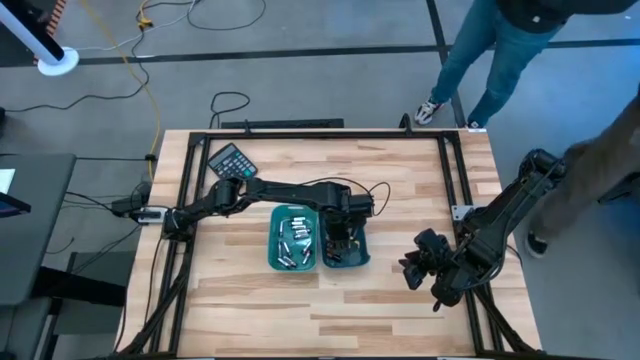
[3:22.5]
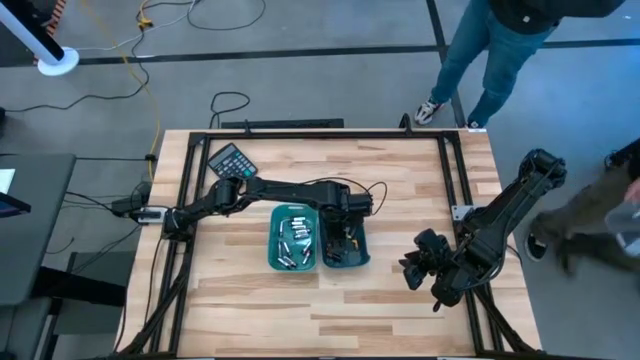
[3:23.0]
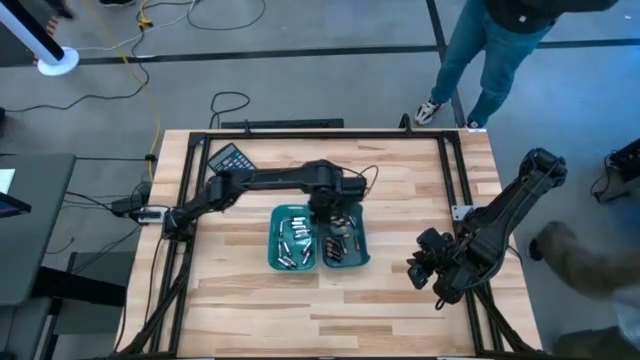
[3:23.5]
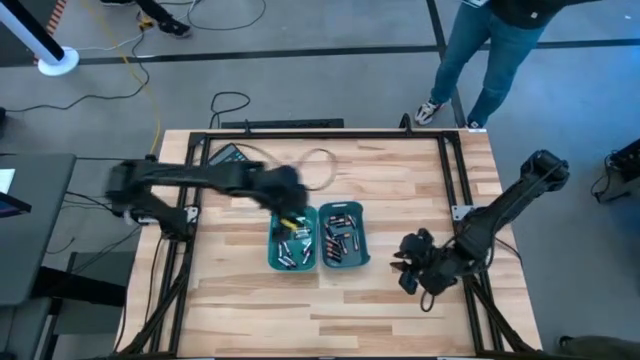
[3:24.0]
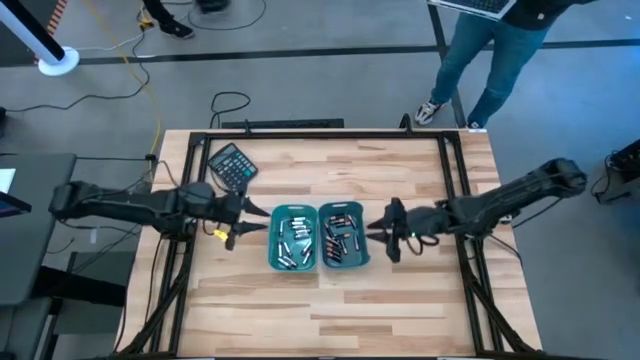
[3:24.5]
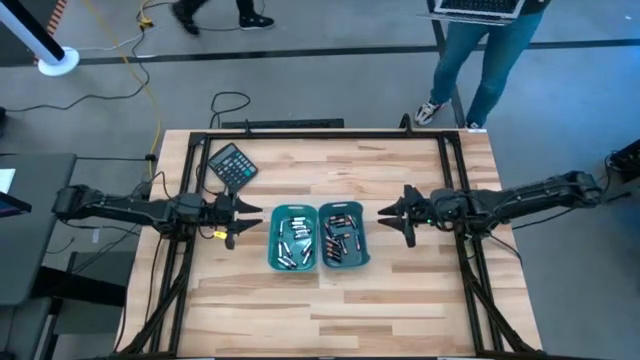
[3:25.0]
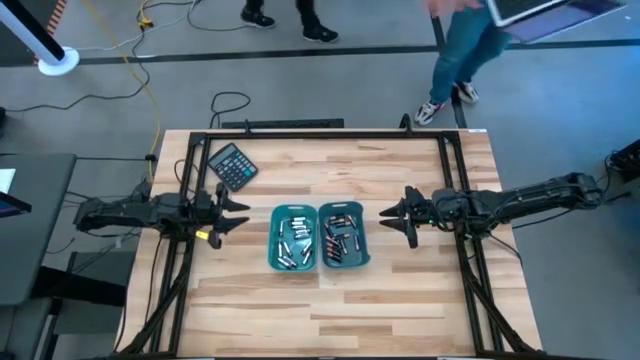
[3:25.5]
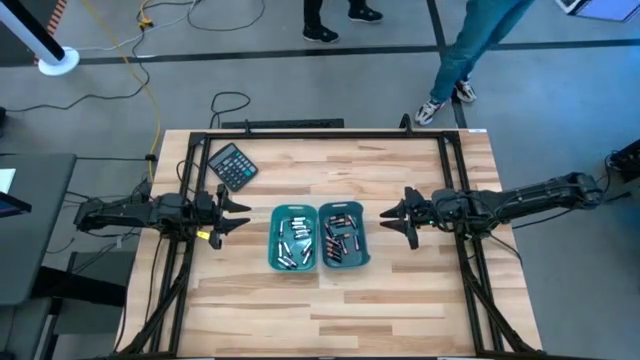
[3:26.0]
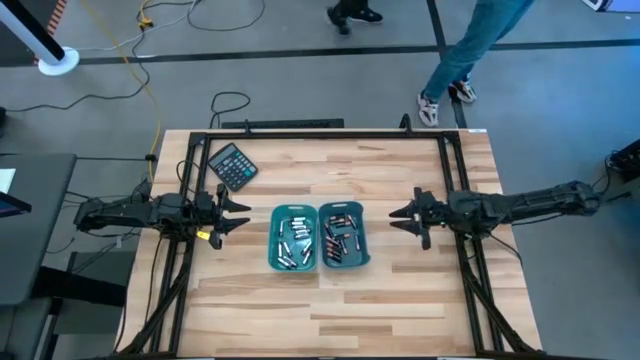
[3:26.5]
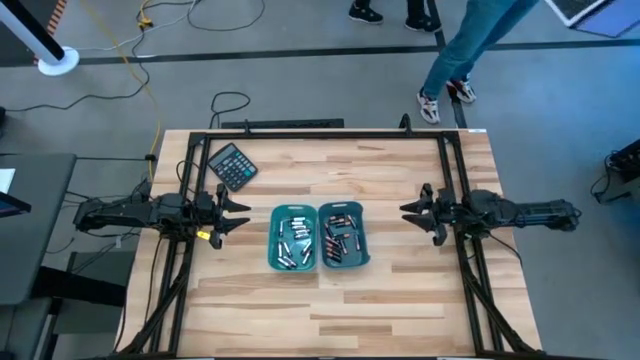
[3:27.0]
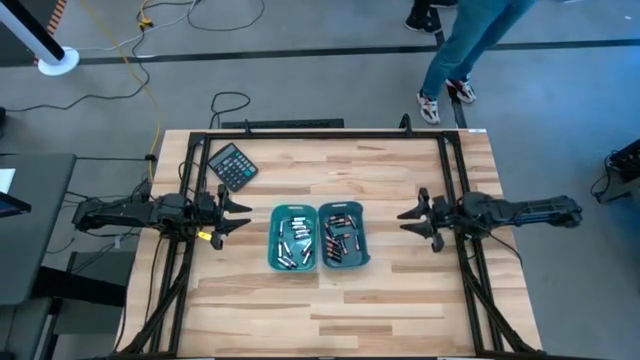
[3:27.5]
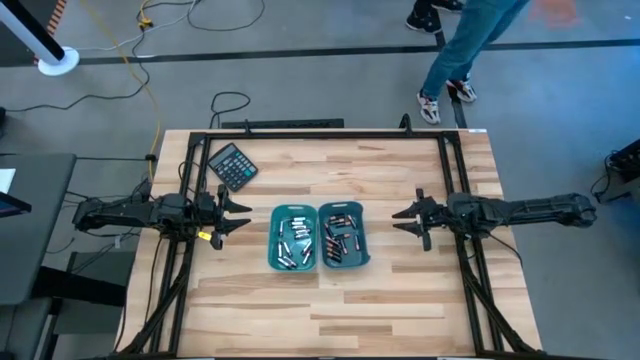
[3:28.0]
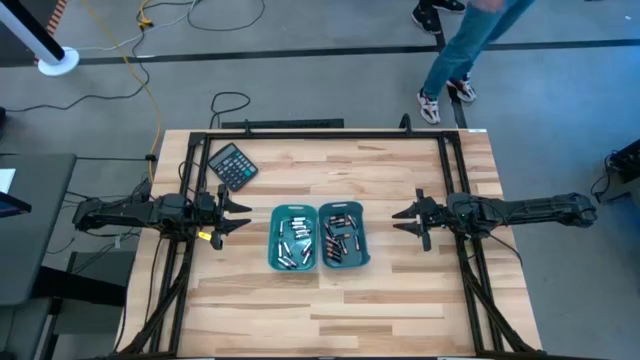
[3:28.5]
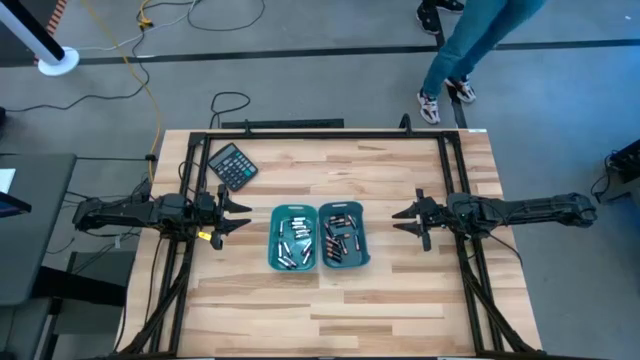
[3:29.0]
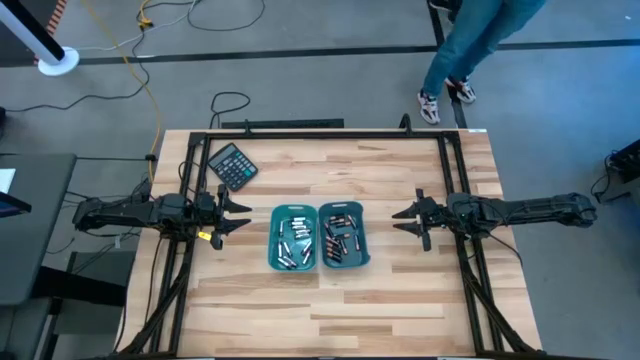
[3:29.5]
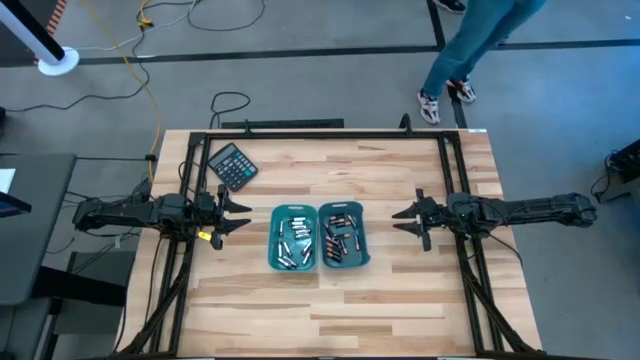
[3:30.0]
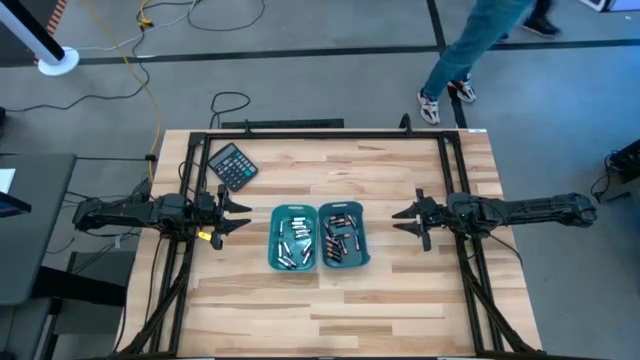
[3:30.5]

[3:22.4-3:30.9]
Task: Sort batteries
Return to Home Position

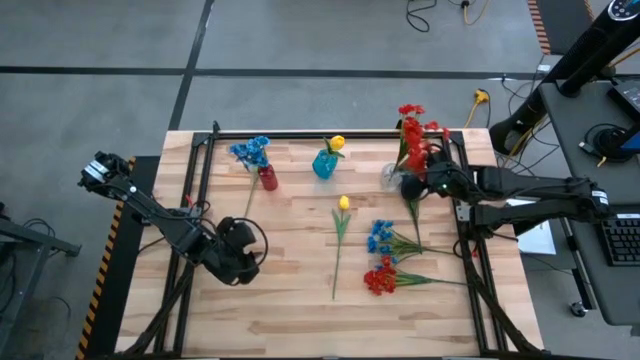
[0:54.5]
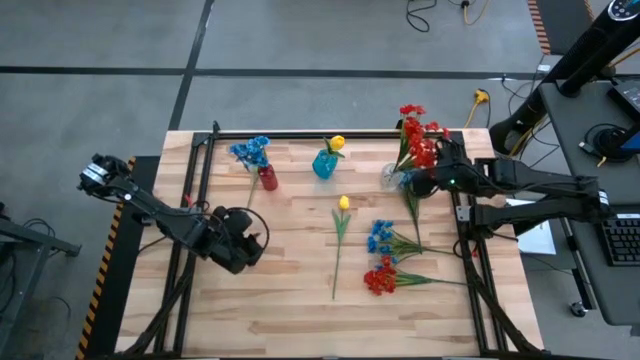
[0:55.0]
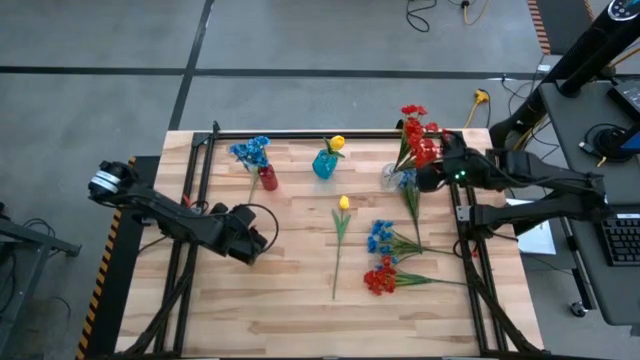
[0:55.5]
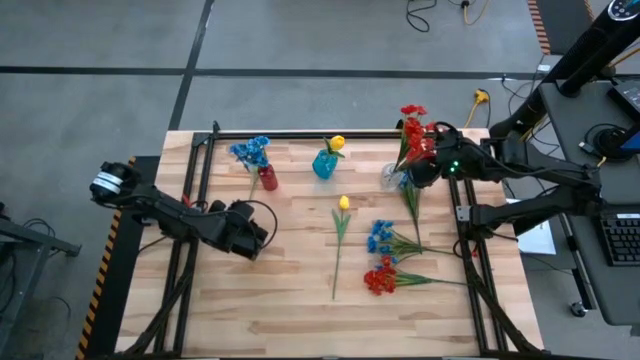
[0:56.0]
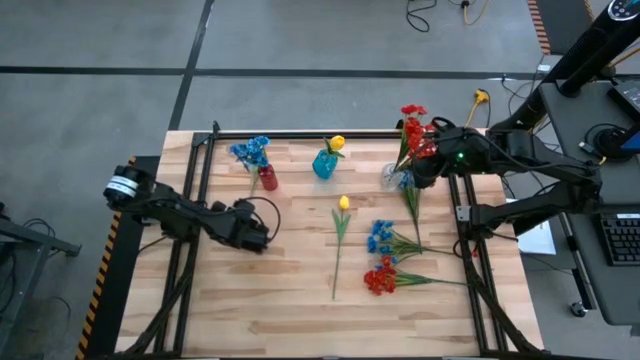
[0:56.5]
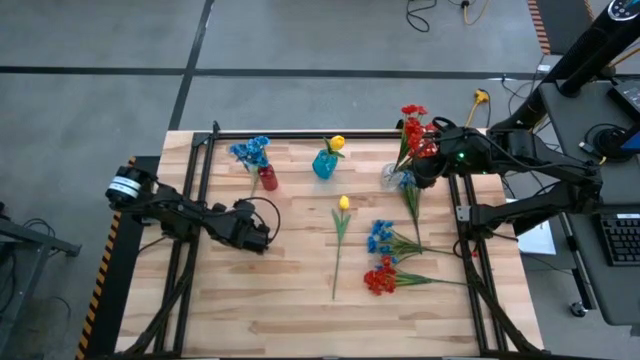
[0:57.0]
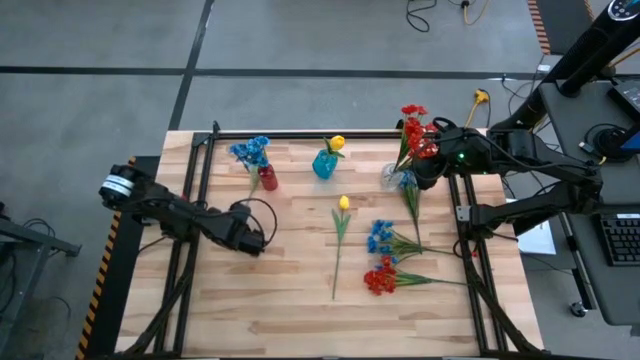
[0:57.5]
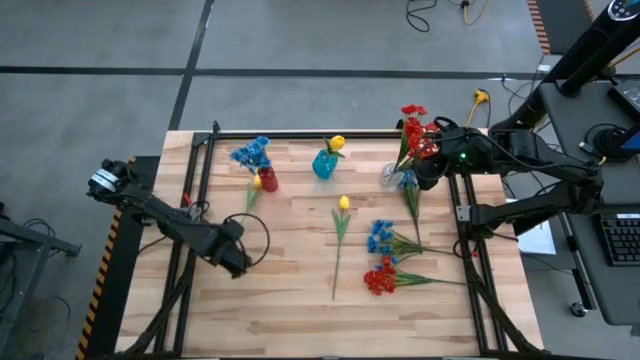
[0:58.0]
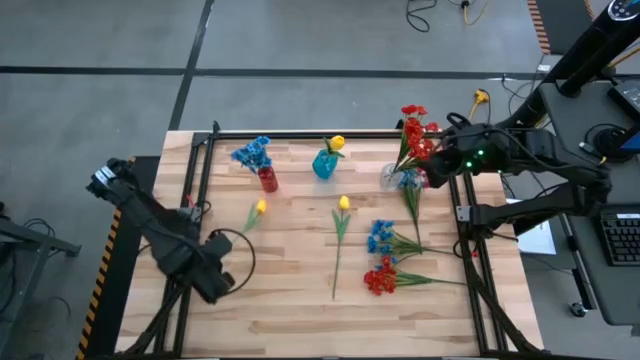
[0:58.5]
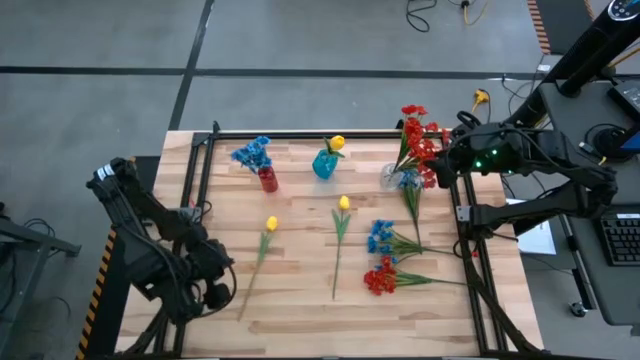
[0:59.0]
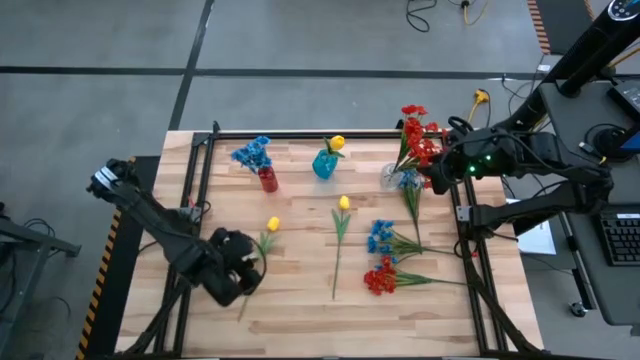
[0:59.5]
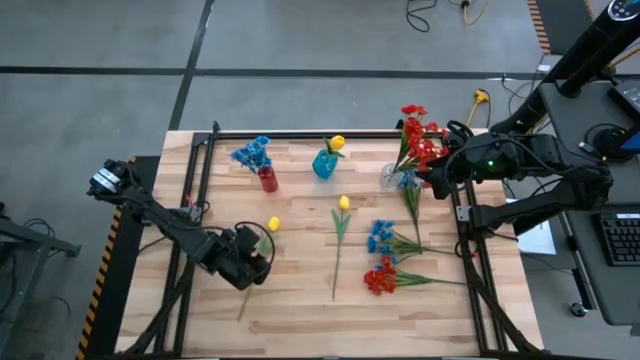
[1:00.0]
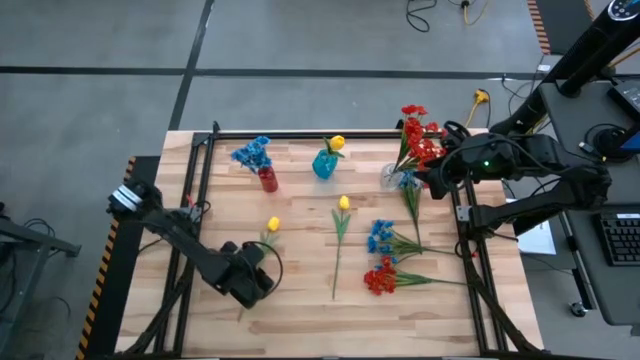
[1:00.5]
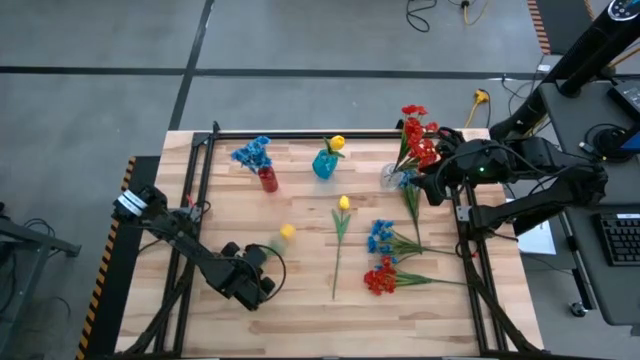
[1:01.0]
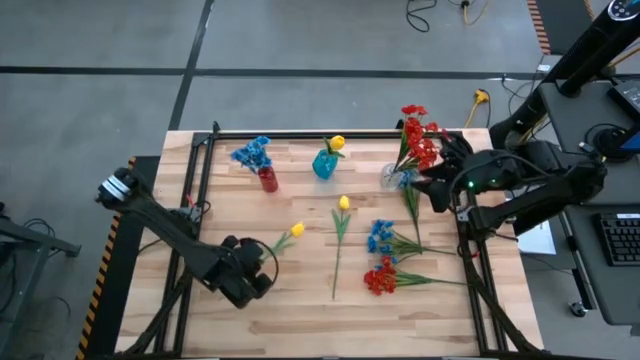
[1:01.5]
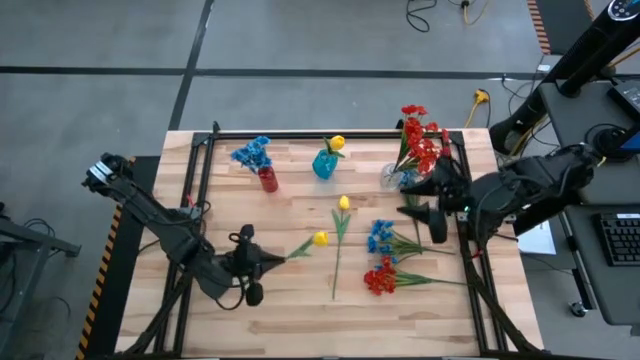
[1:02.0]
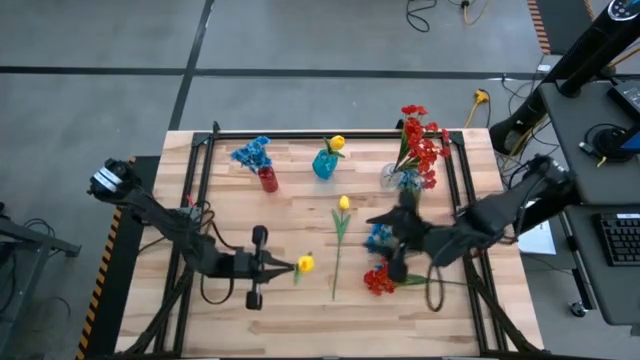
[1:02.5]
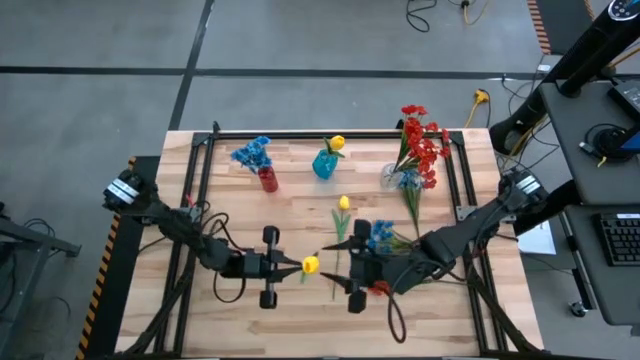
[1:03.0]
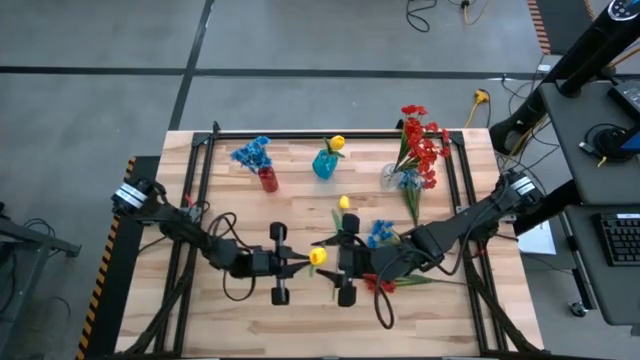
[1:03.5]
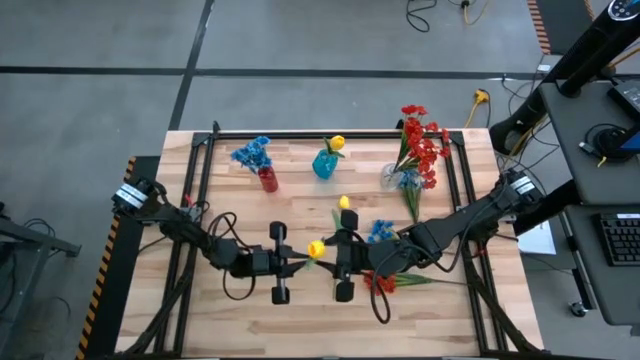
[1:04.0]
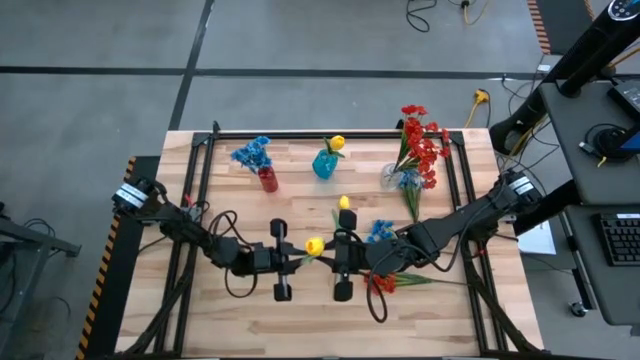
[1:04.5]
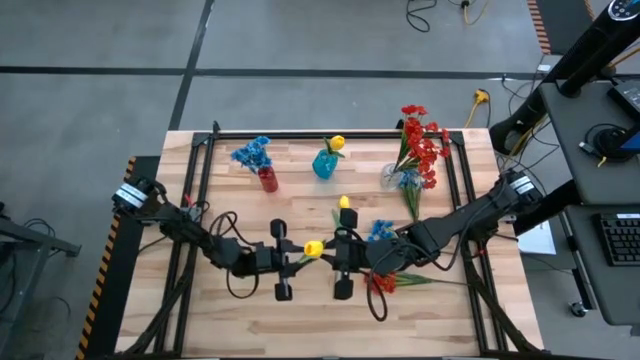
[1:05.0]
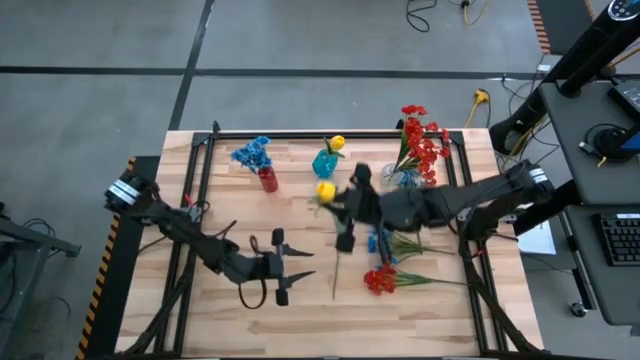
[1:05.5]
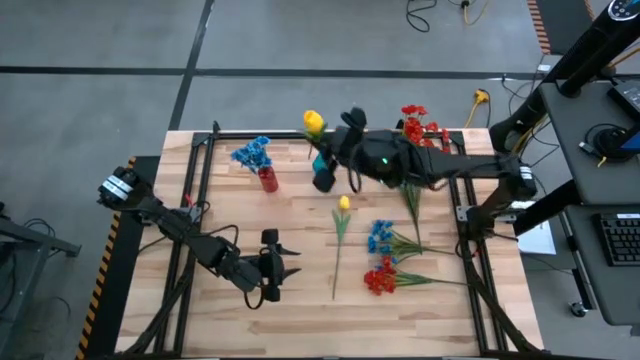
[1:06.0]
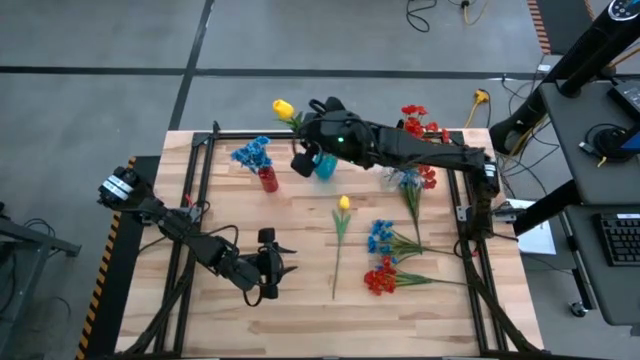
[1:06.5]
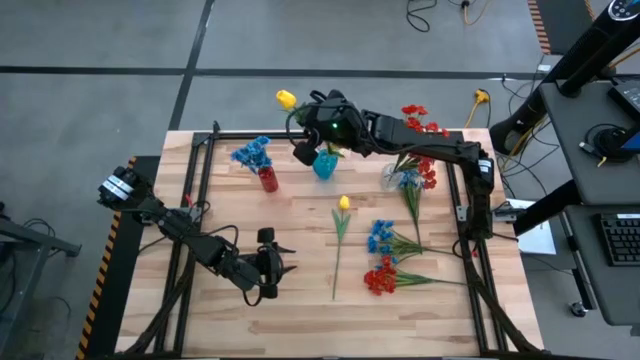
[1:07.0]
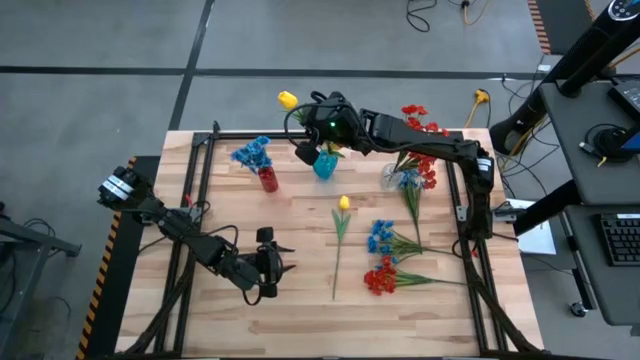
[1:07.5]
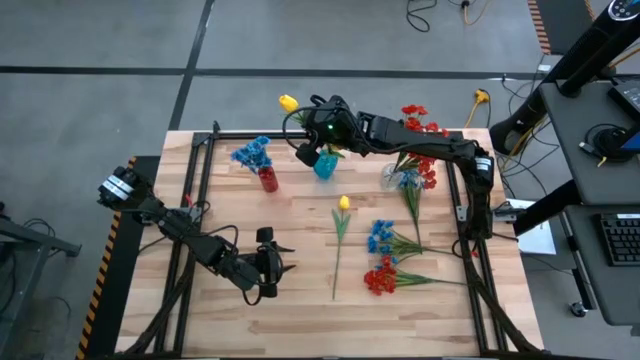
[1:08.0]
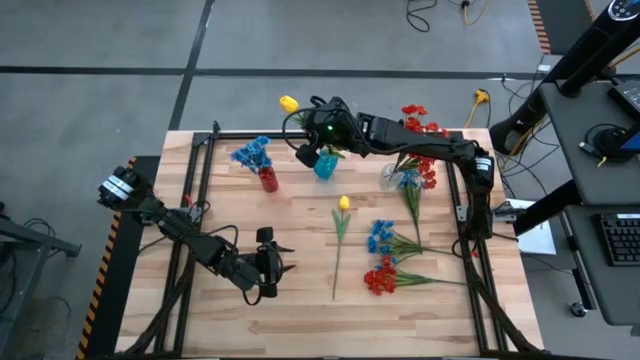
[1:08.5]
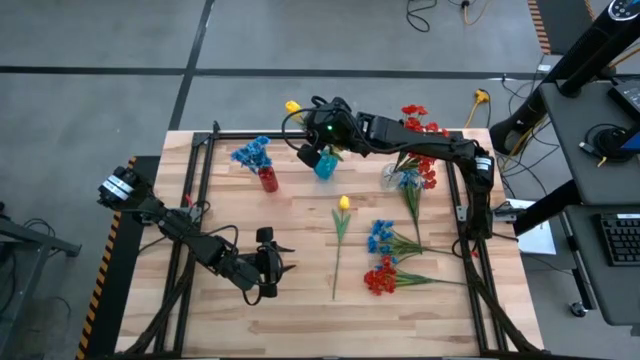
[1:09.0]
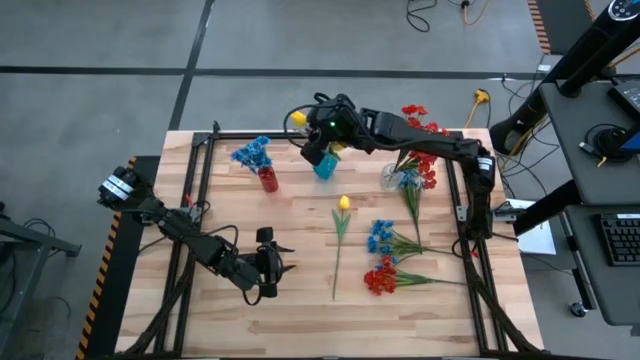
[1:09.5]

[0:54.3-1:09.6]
Task: Sort flowers into vase by color
Put the left yellow flower into the blue vase
